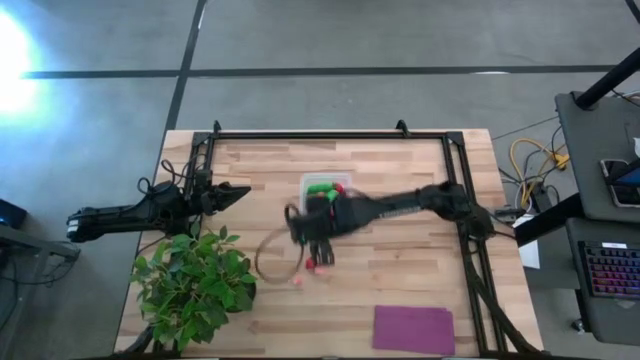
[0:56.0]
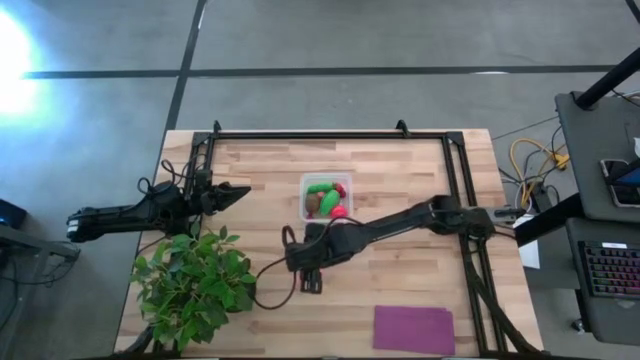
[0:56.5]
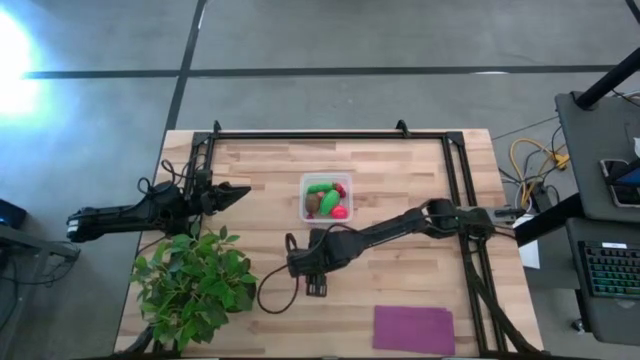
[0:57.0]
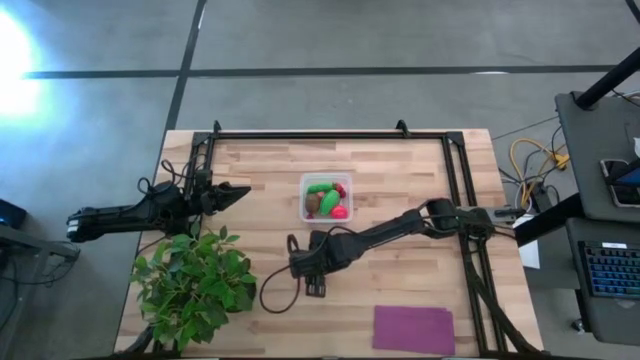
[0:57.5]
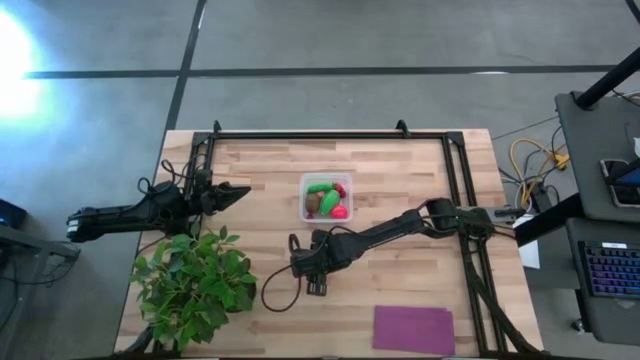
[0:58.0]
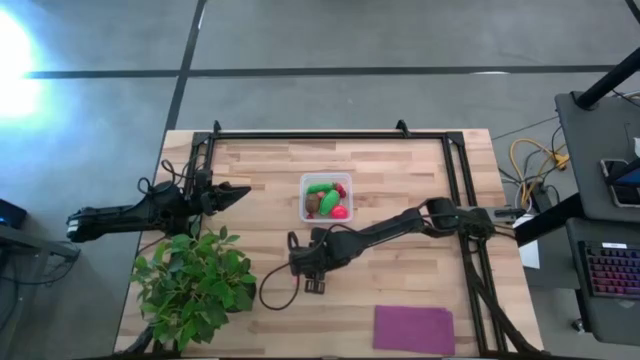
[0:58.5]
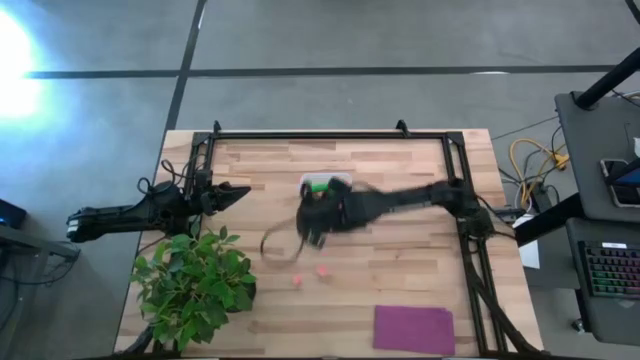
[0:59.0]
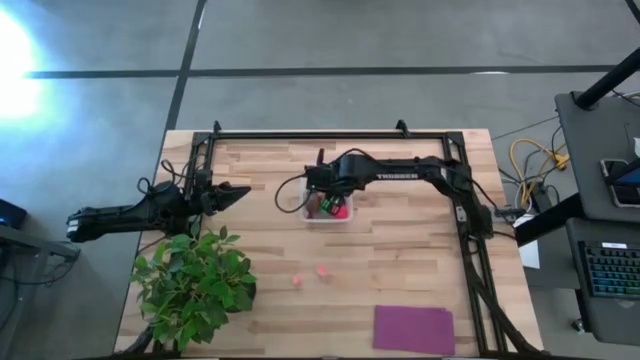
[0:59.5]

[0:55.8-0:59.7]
Task: Pick and placing Produce into tupperware
Put the strawberry into the transparent bin

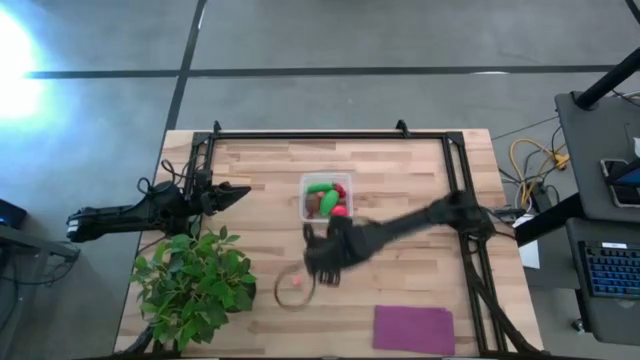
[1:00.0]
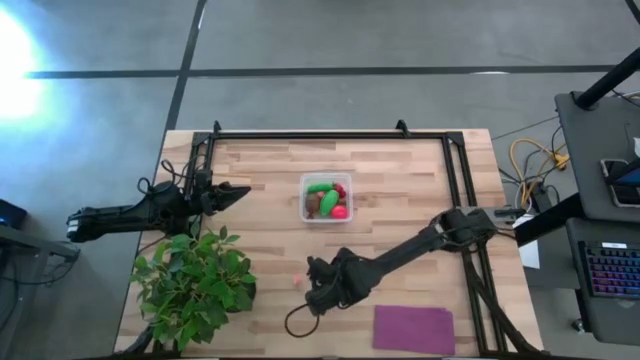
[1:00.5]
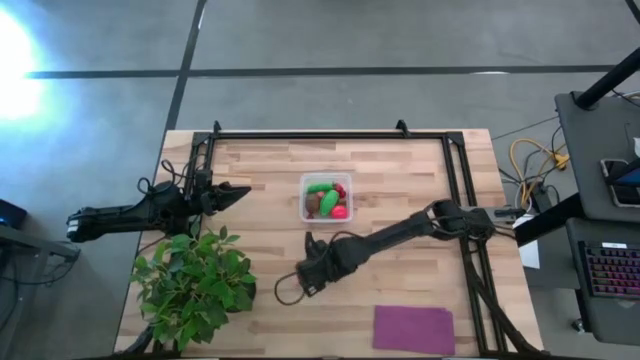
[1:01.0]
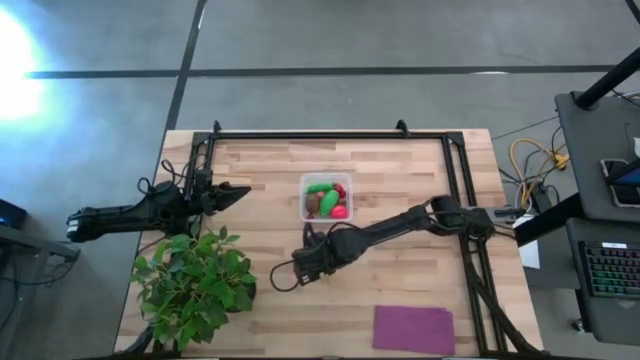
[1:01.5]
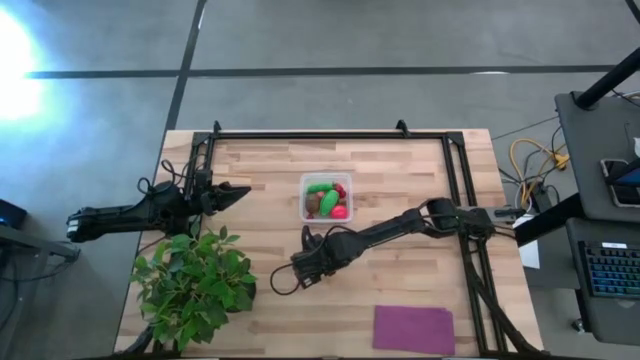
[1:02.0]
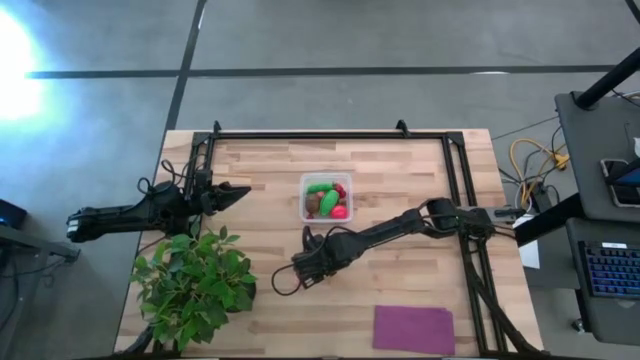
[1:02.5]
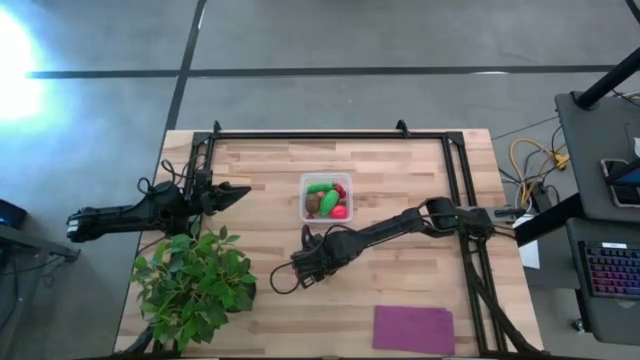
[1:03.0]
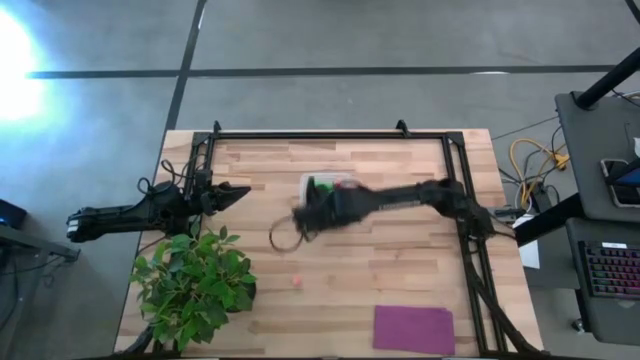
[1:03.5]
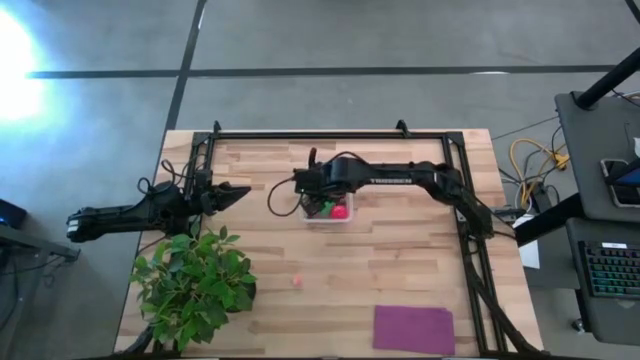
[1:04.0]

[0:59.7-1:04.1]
Put the right pink peach into the transparent bin

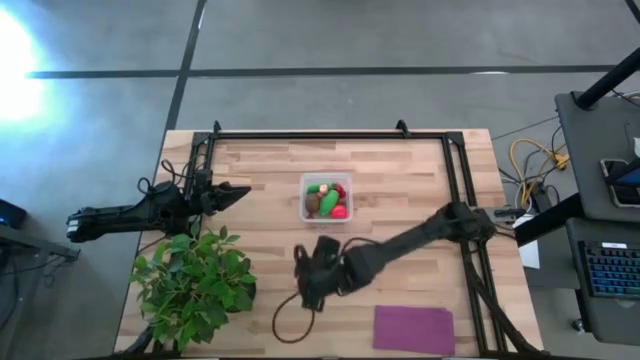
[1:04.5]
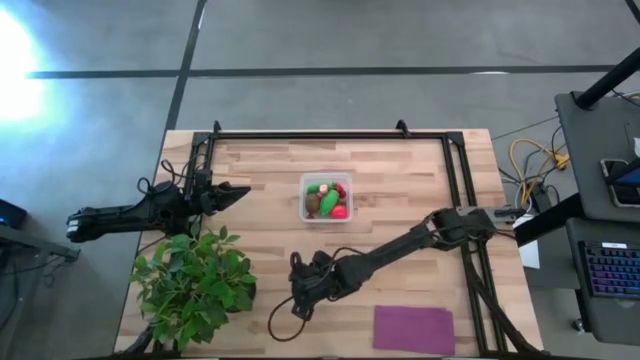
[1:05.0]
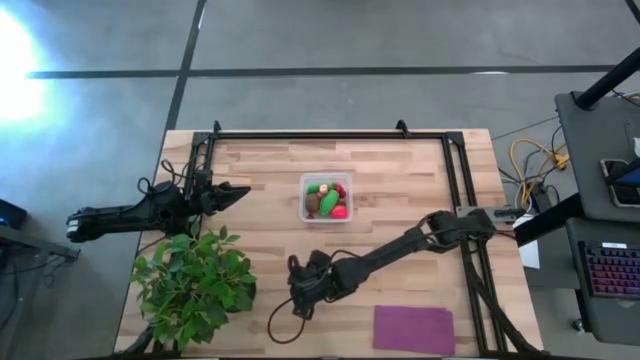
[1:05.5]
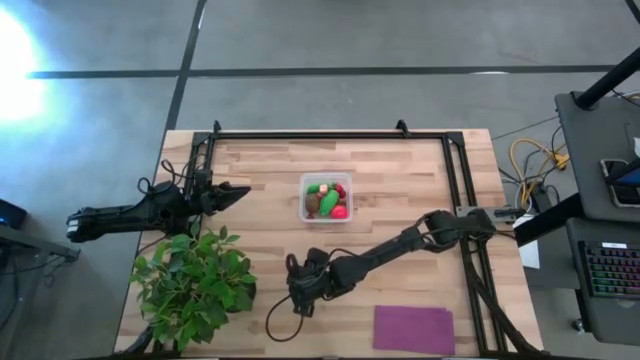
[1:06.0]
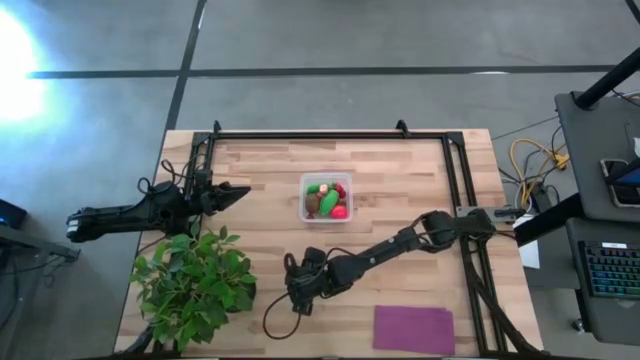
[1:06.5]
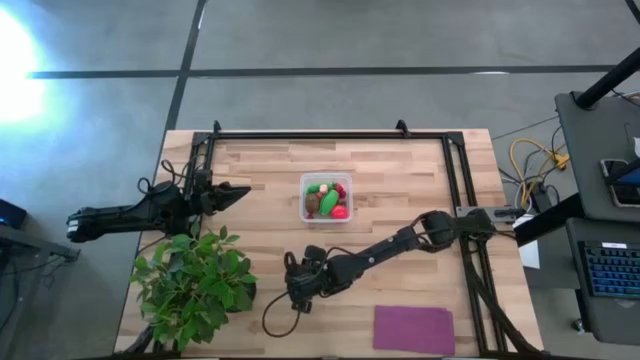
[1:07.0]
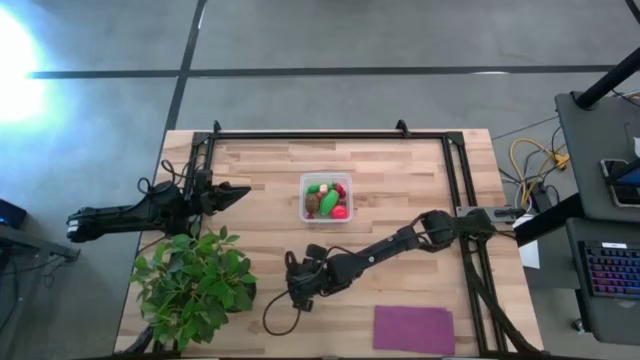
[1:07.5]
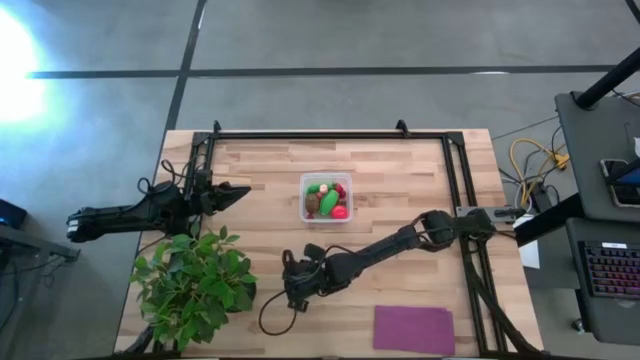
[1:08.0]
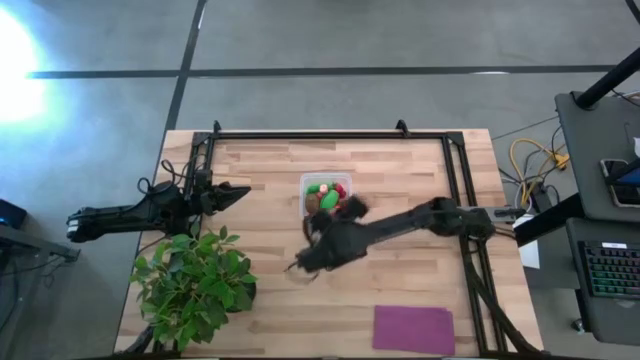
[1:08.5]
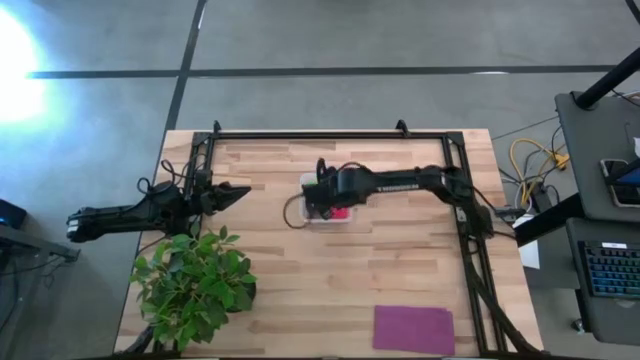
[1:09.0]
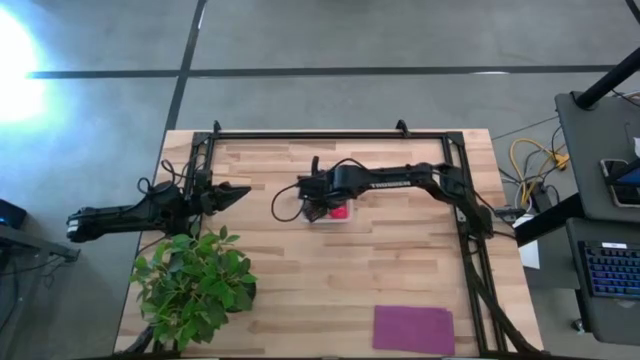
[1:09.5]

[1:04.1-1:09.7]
Put the pink peach into the transparent bin

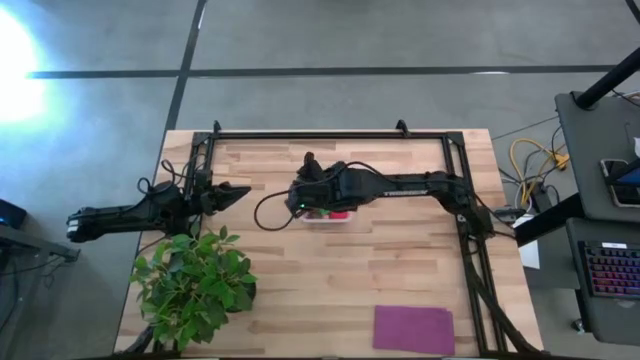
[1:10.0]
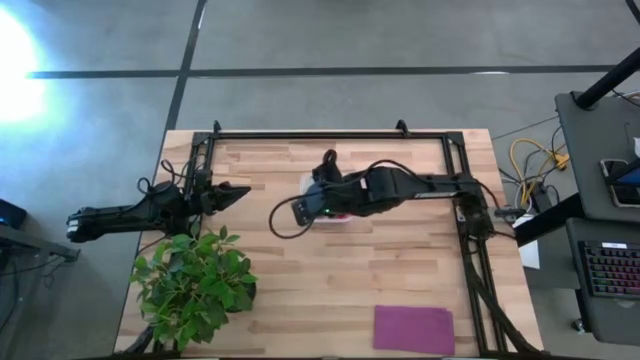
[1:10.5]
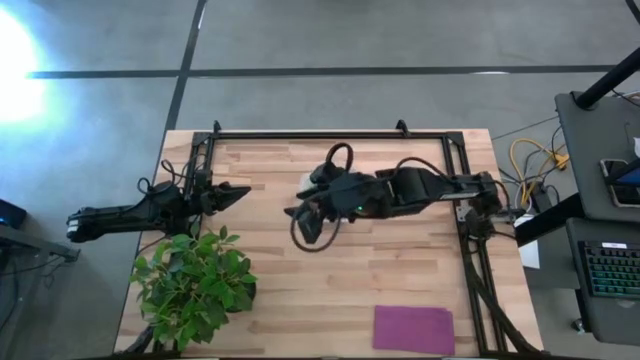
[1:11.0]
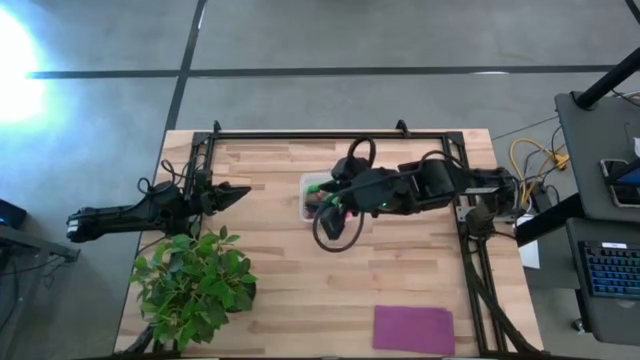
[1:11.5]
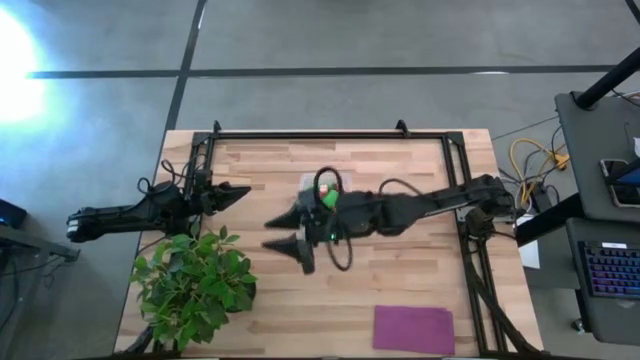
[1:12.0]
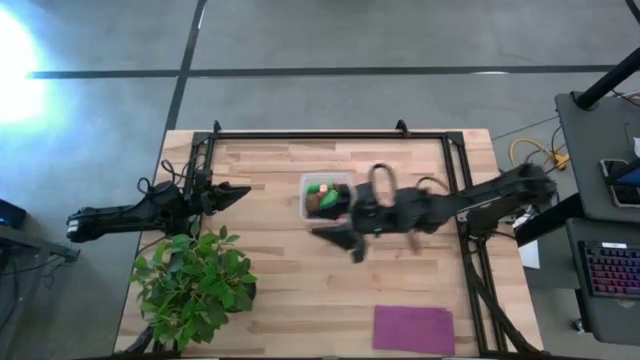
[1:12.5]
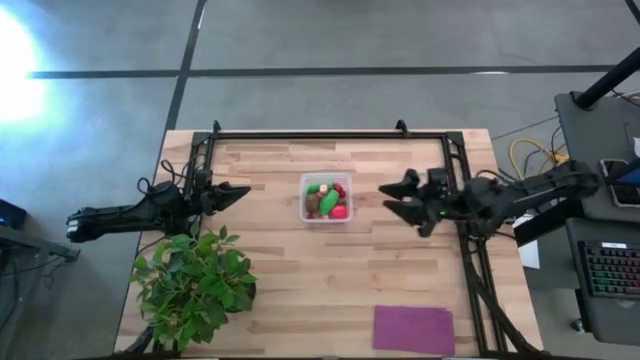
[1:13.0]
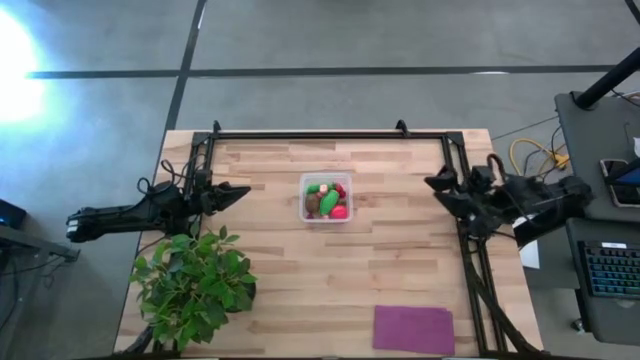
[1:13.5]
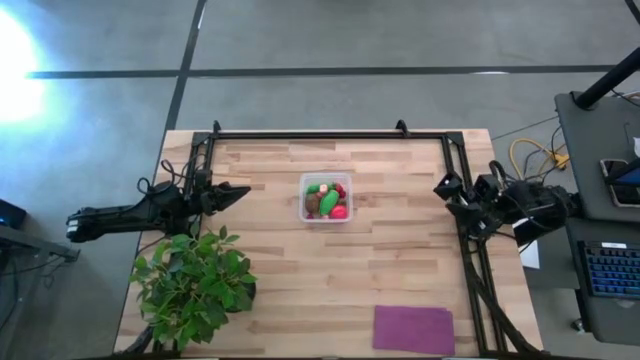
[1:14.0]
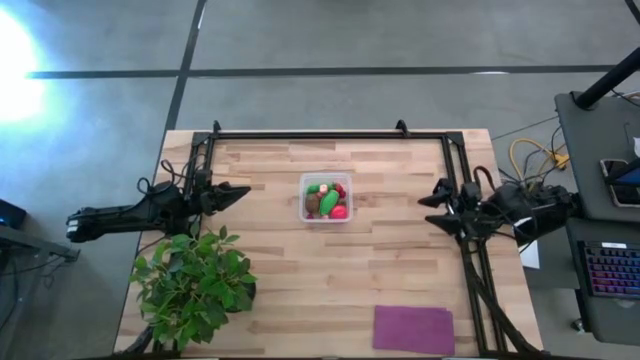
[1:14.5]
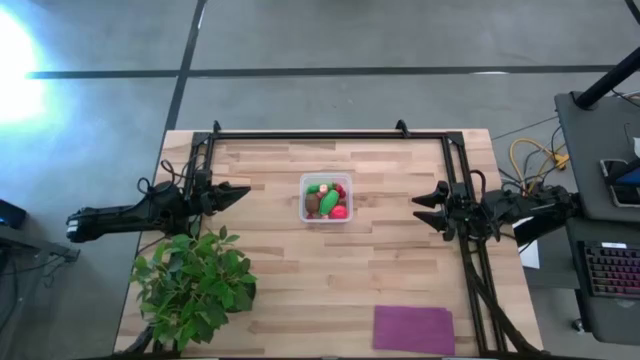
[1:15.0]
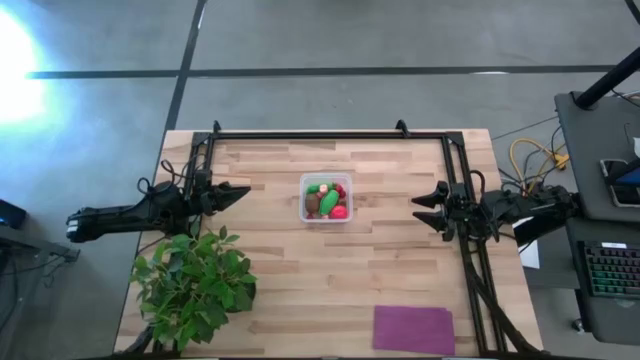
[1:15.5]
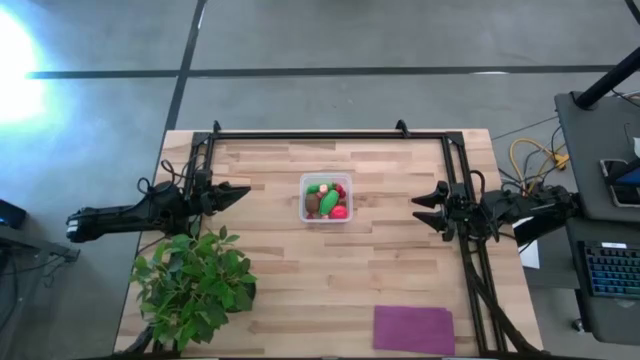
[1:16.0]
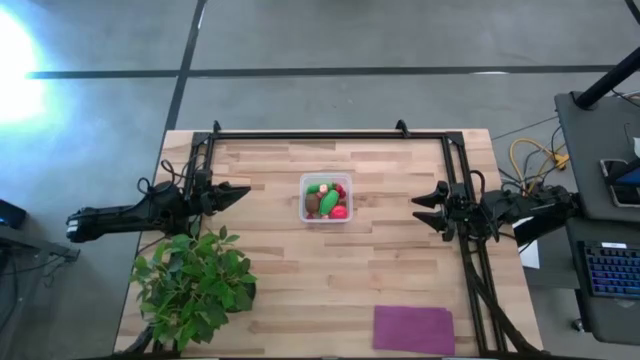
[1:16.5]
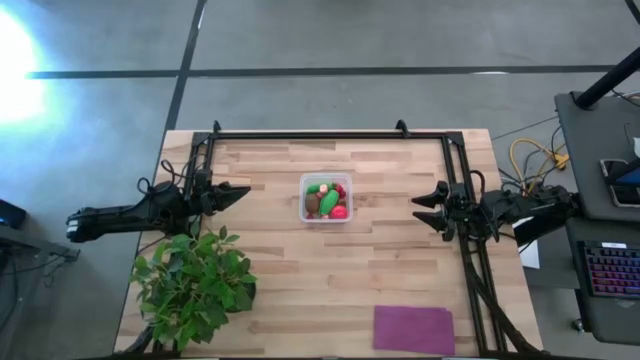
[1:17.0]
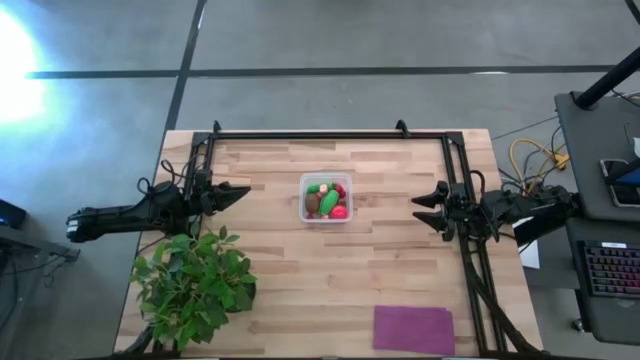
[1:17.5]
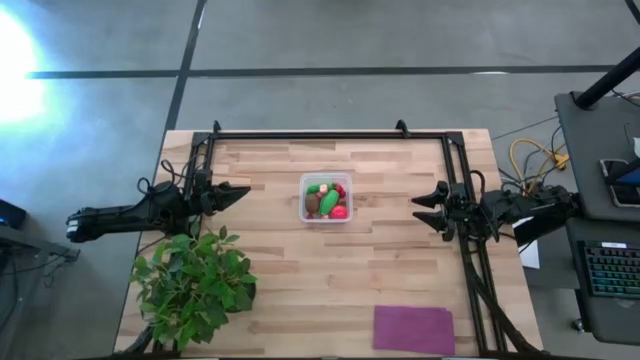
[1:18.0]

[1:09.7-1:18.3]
Return to Home Position
